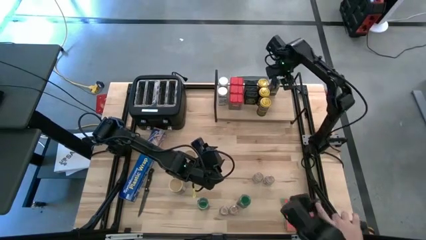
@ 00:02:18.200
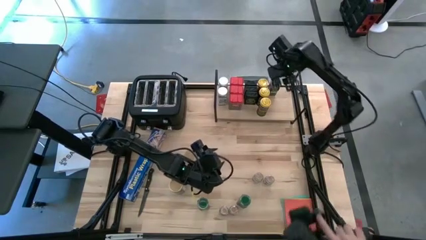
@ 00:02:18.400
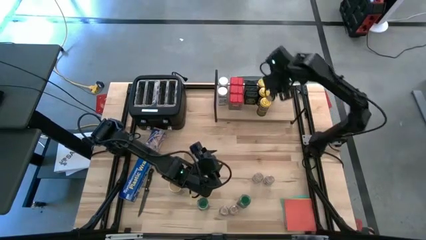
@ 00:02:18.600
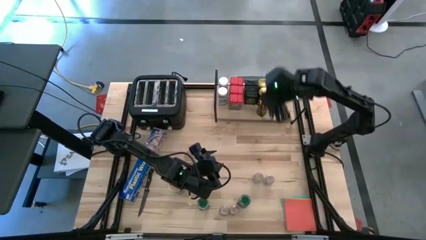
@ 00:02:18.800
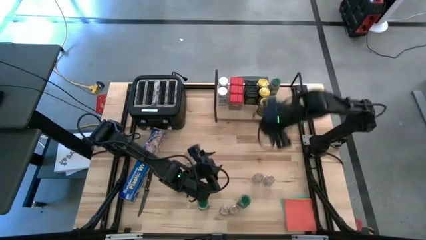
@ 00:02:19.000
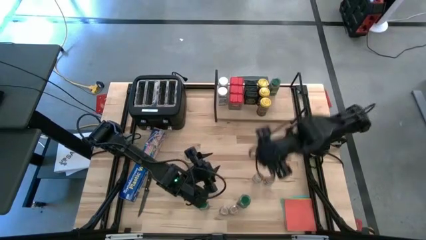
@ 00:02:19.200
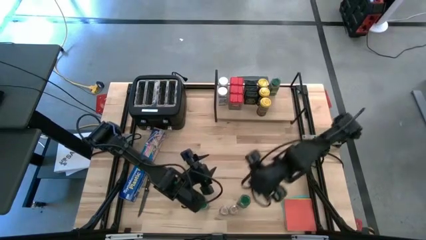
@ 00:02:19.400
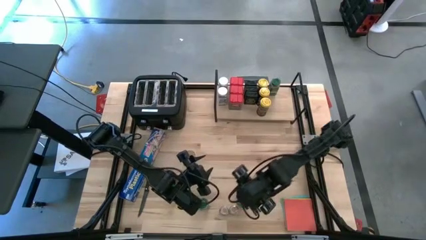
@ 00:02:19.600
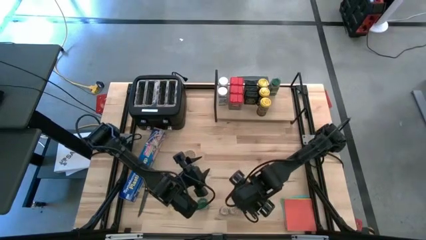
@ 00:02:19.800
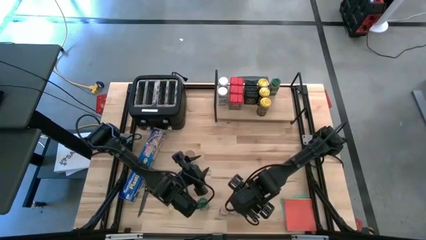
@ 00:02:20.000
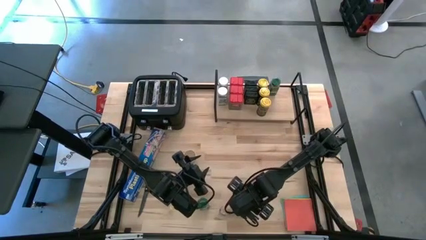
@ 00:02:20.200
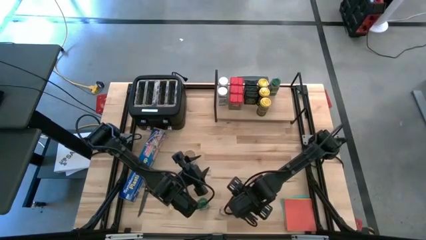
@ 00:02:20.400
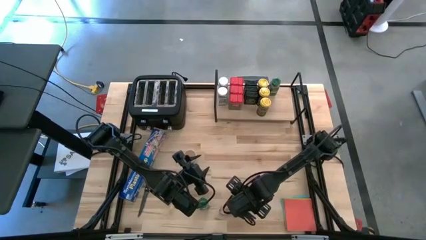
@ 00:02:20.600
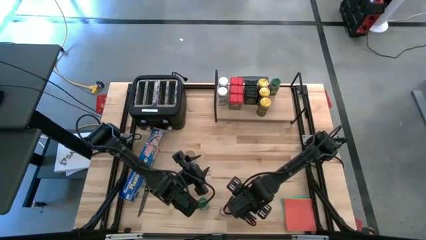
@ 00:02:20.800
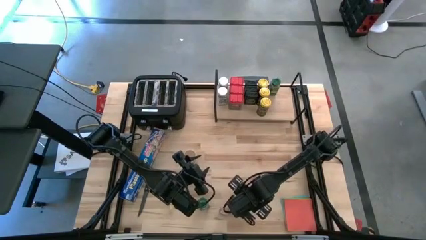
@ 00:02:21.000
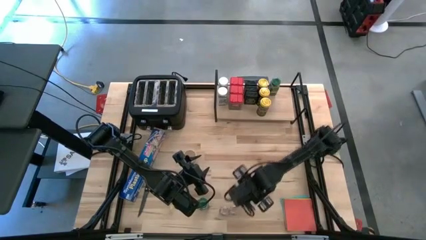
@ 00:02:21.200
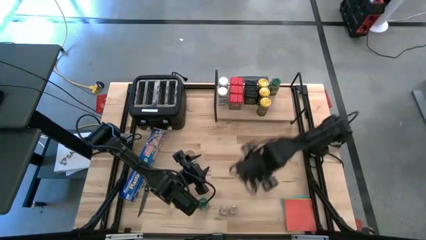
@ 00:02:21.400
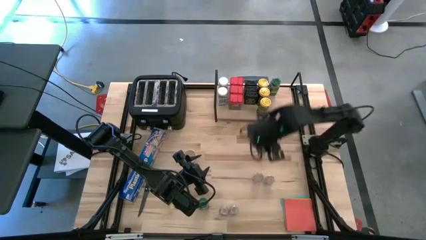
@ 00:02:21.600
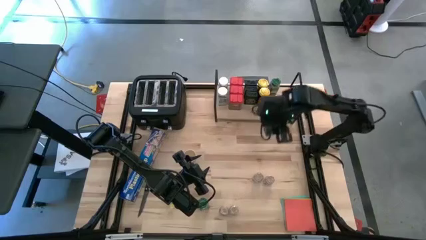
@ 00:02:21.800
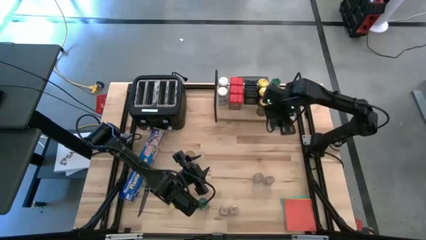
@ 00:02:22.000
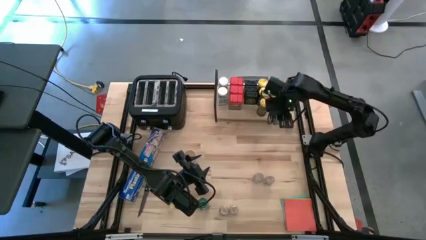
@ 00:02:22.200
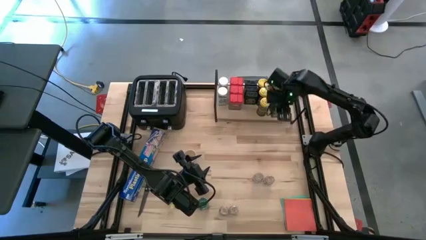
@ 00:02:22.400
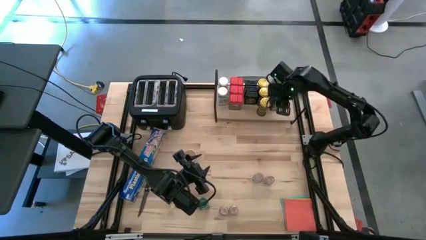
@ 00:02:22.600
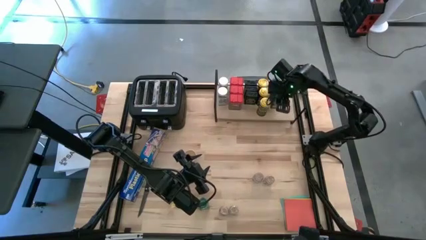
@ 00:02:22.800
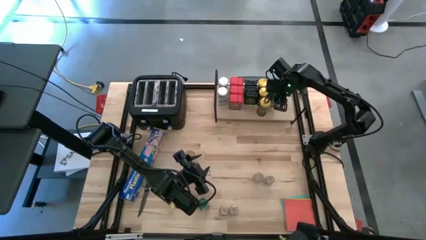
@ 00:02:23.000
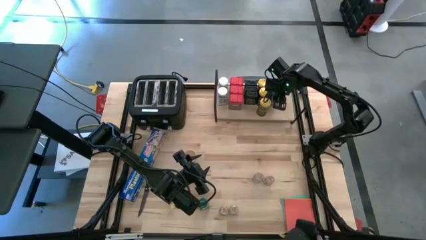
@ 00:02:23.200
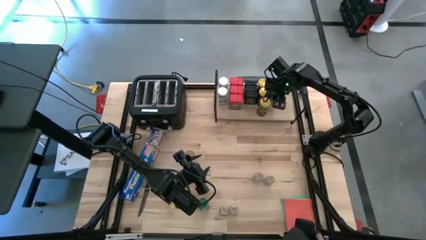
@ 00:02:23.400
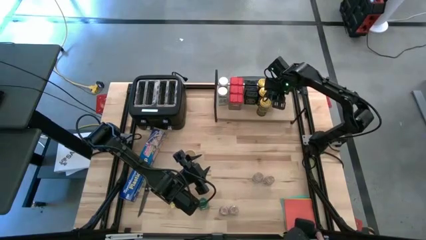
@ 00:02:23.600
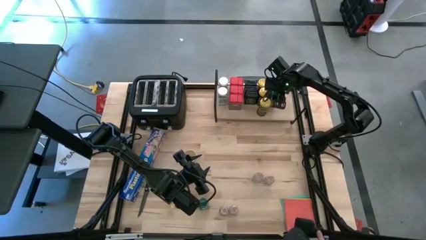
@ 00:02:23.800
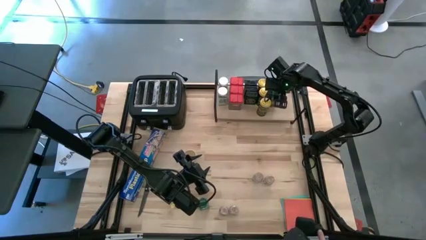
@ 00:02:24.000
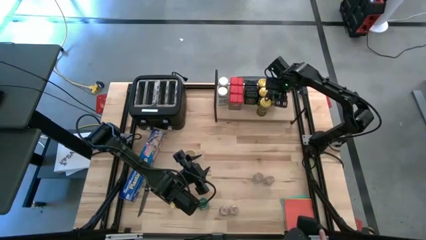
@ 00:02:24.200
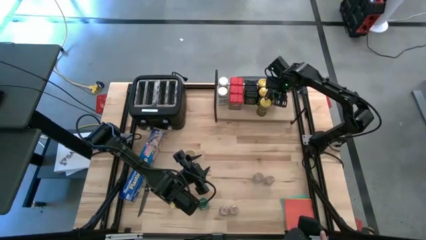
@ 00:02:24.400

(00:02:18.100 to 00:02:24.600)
Task: Shelf spices
Put the right green seasoning bottle on the shelf aligned with the other green seasoning bottle

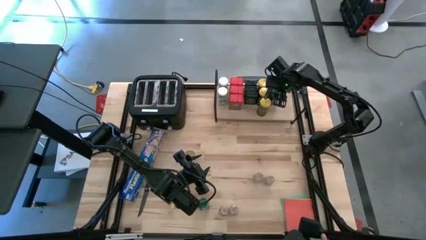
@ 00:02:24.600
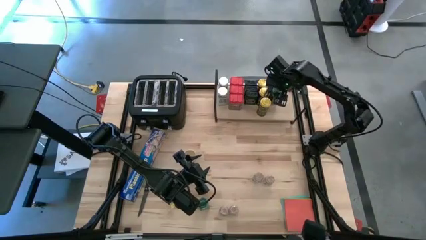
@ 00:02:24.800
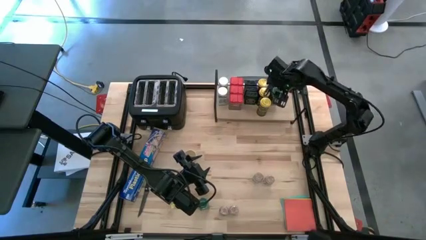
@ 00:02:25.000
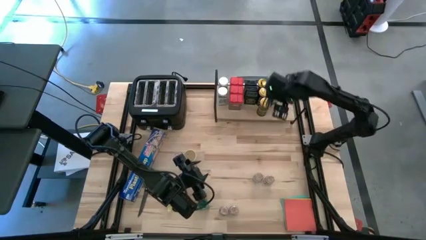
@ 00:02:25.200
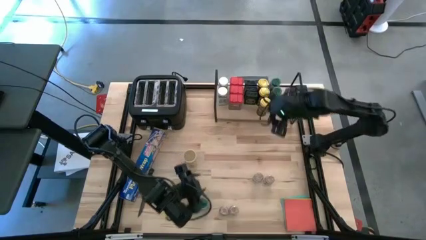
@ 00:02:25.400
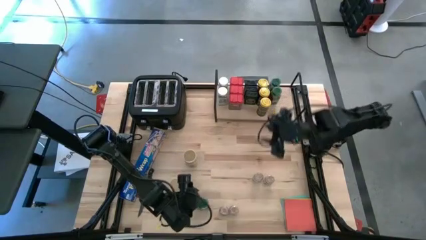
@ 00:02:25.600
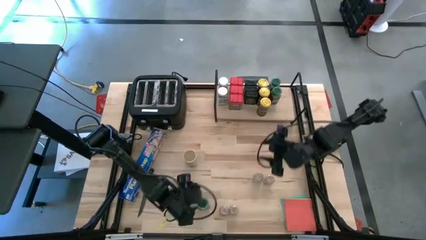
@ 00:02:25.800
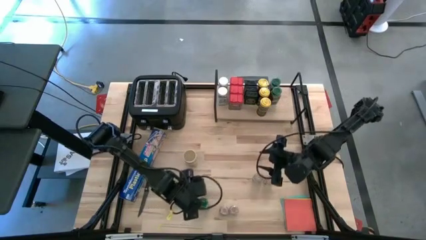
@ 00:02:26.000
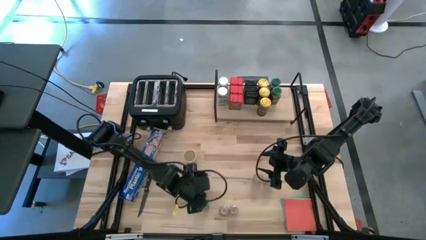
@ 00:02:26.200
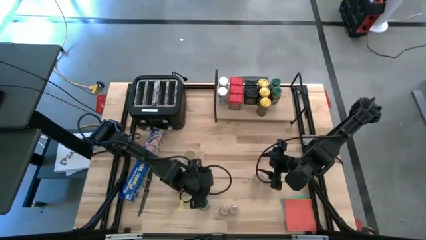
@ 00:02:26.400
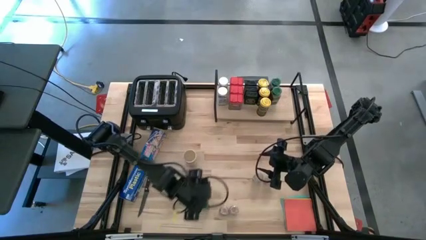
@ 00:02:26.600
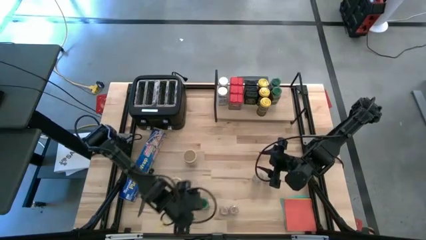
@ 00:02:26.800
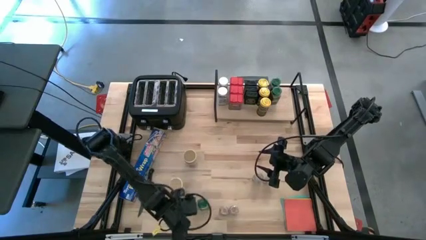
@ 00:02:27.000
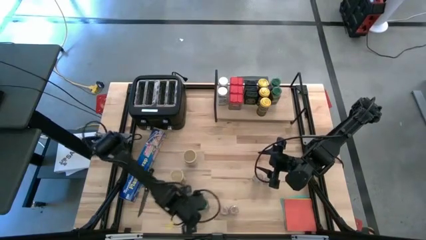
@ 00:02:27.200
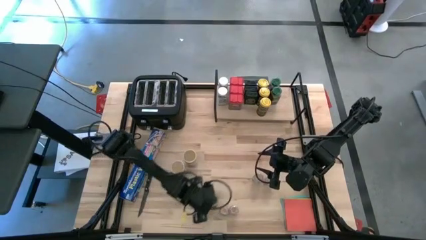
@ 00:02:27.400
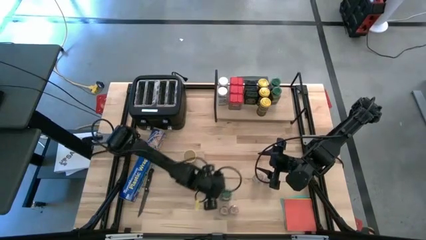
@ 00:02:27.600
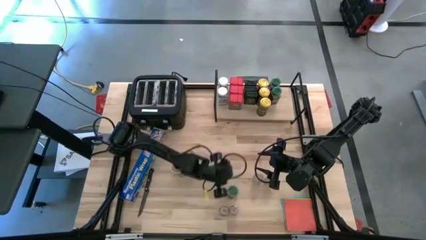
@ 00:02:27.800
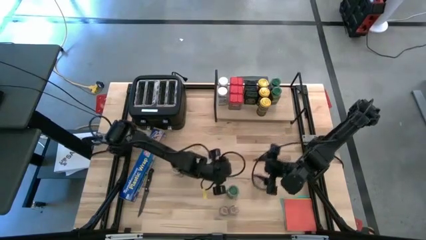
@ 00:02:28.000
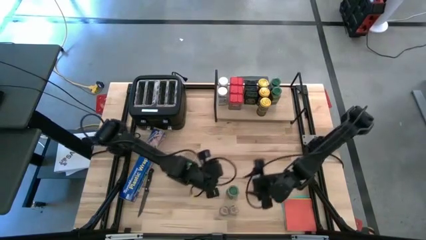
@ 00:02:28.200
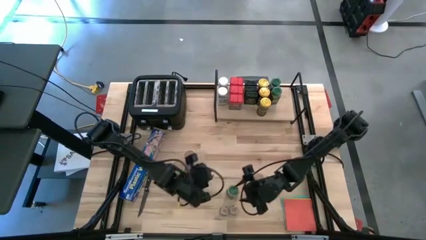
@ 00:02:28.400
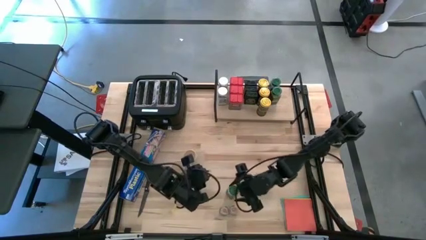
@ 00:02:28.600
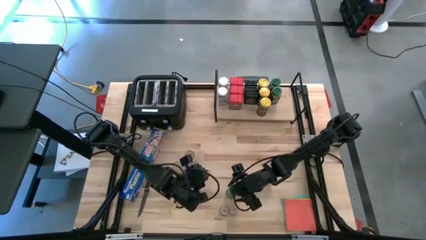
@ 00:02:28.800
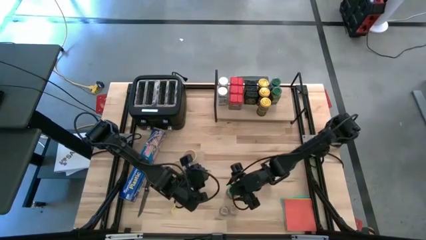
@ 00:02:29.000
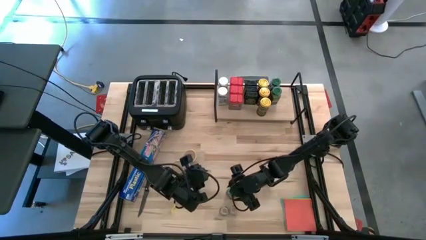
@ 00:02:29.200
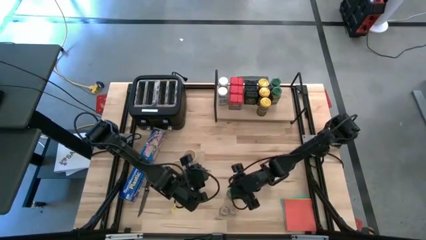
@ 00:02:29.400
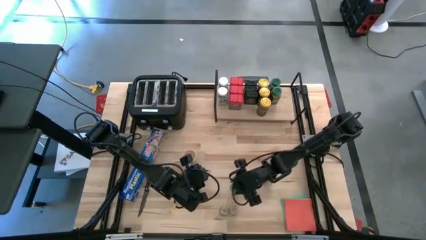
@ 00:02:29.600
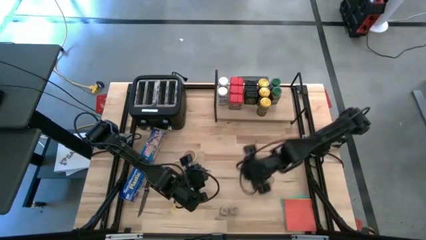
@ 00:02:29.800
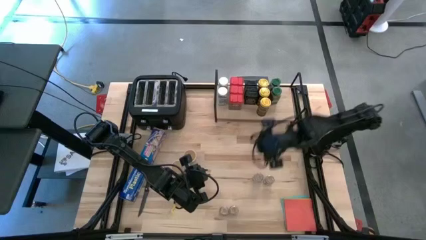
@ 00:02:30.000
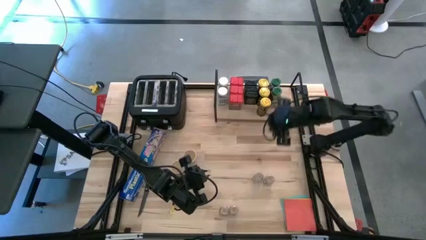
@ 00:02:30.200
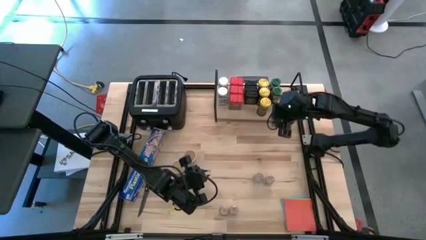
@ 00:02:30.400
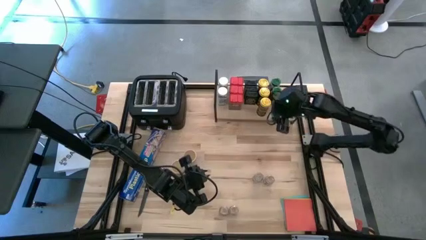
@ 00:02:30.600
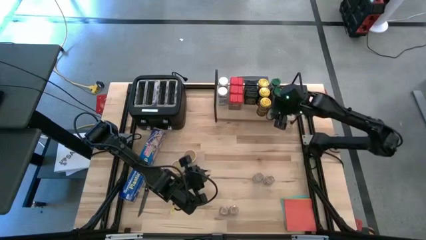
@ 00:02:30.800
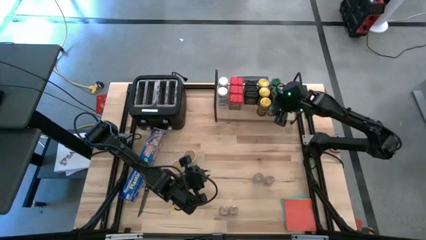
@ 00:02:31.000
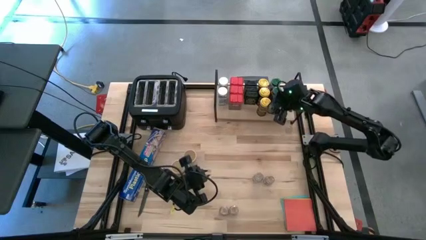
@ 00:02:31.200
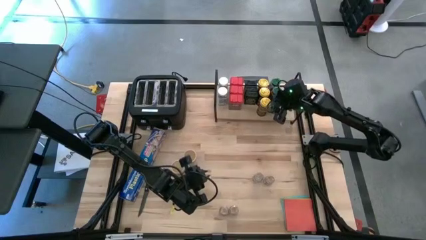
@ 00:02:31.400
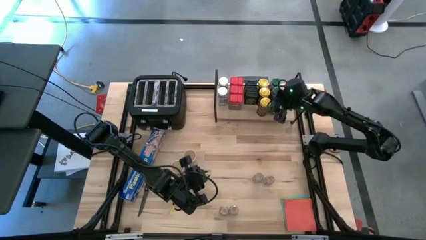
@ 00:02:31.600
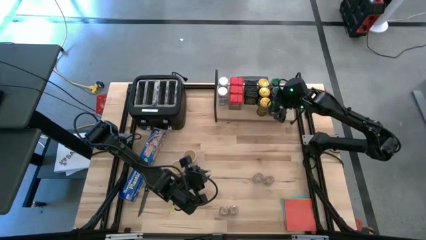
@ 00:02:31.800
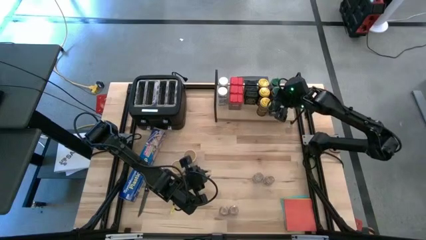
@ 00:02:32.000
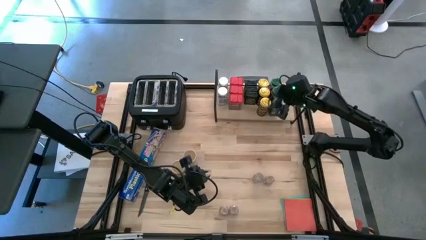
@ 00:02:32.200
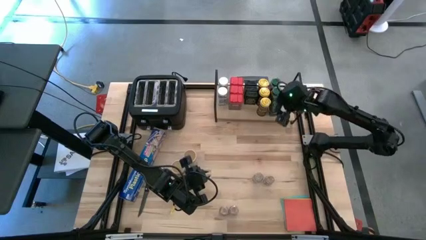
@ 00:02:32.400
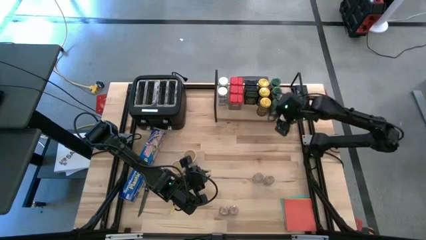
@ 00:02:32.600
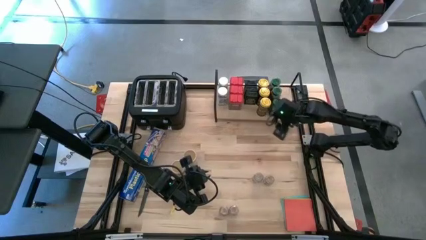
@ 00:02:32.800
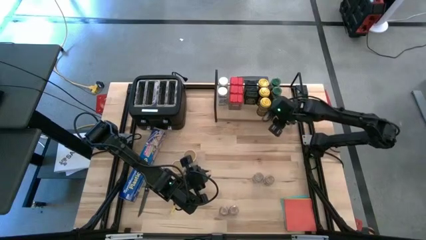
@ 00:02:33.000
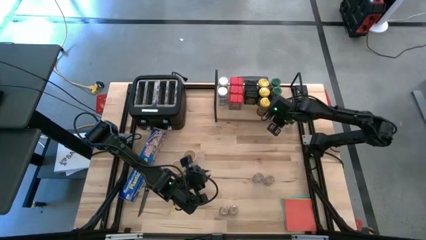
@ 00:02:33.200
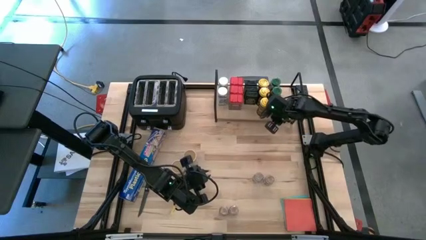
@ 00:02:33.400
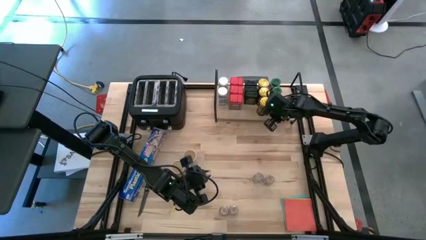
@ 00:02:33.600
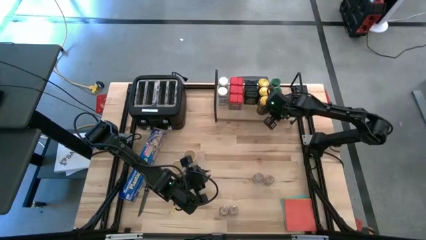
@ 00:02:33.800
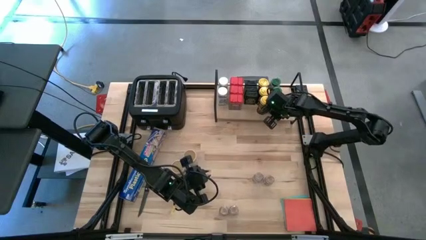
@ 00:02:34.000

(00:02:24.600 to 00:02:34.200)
Put the green seasoning bottle on the shelf aligned with the other green seasoning bottle
